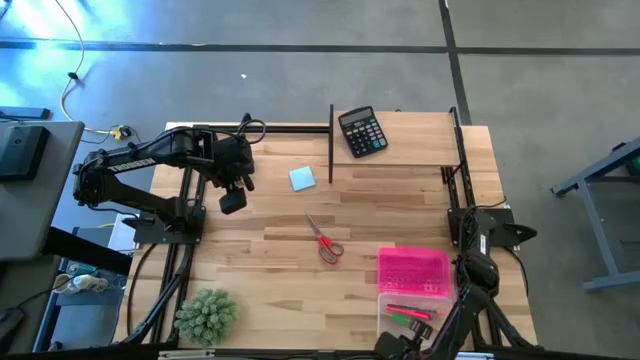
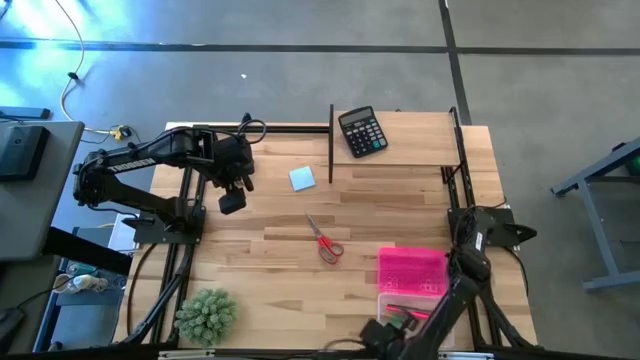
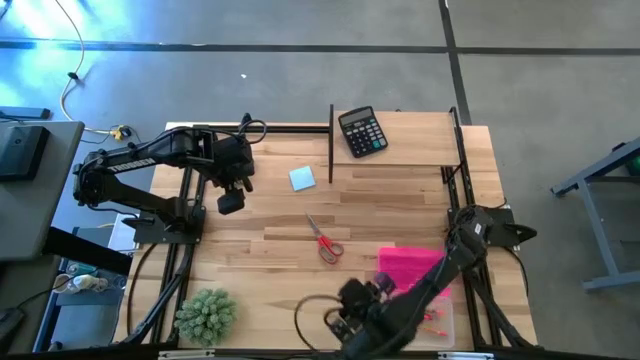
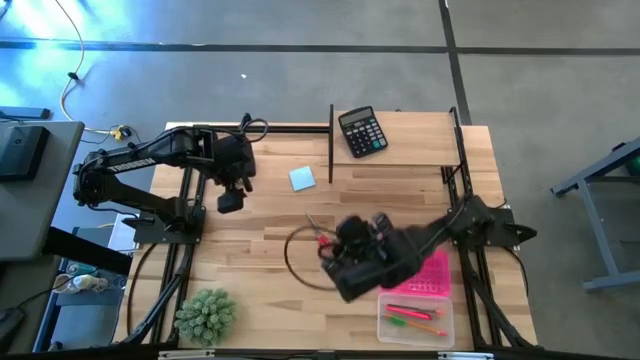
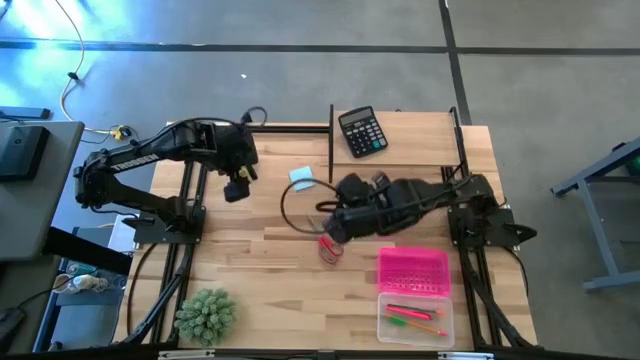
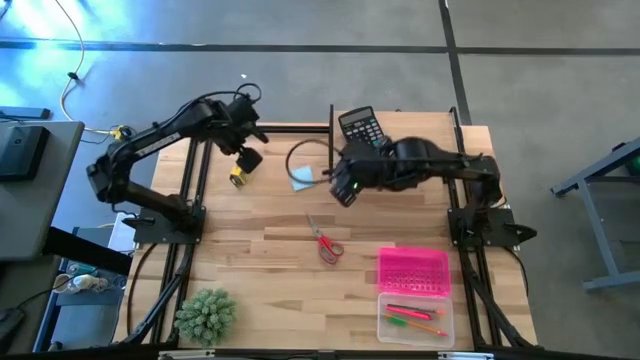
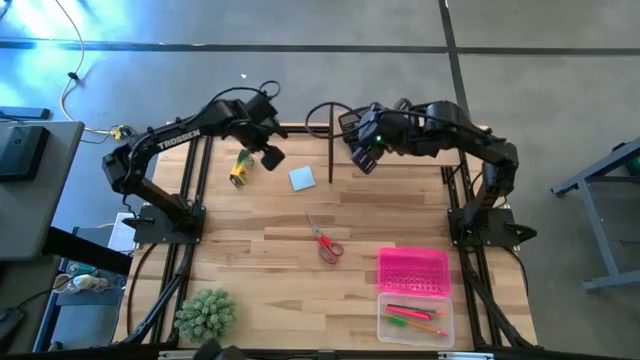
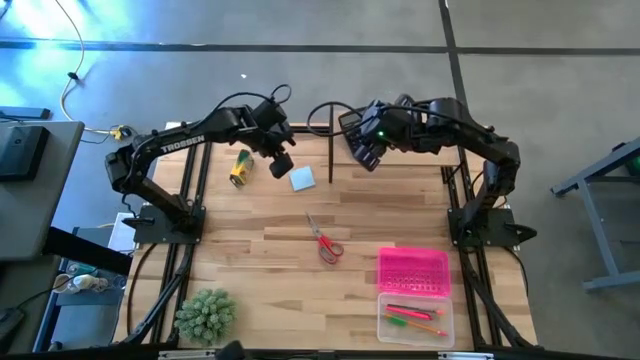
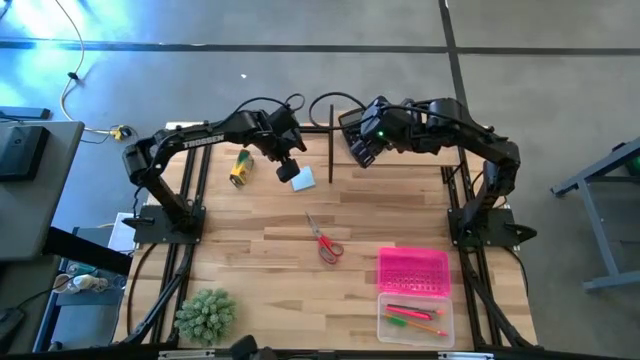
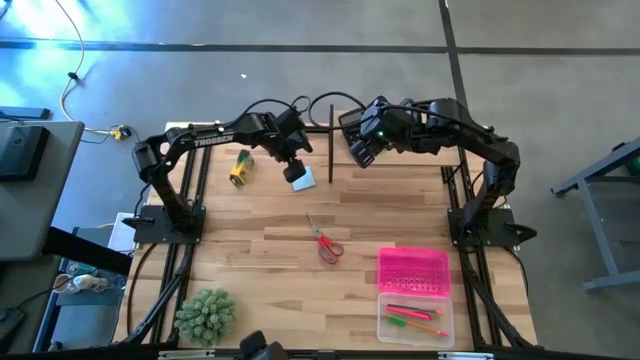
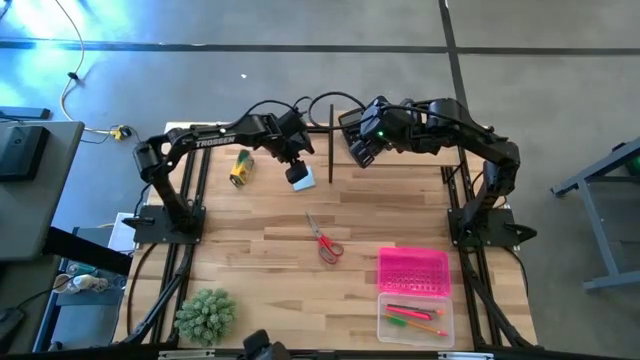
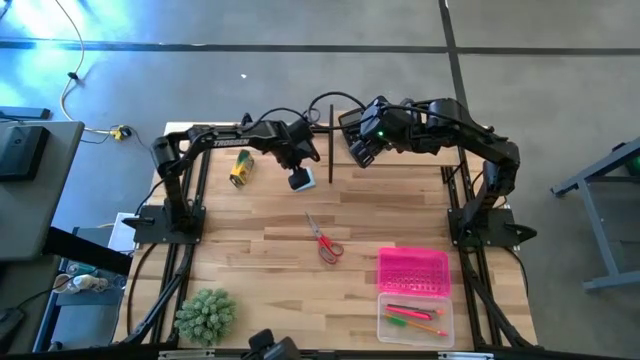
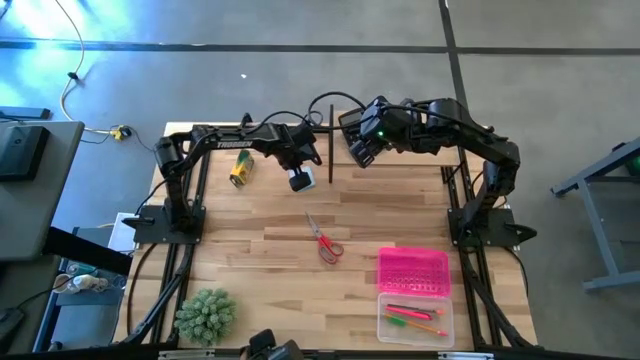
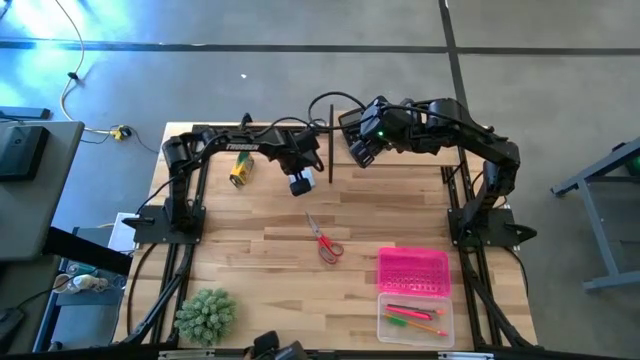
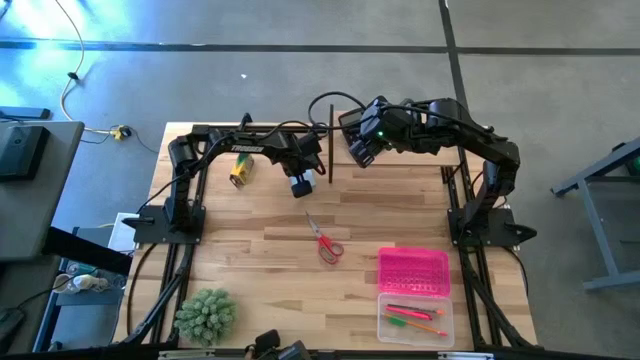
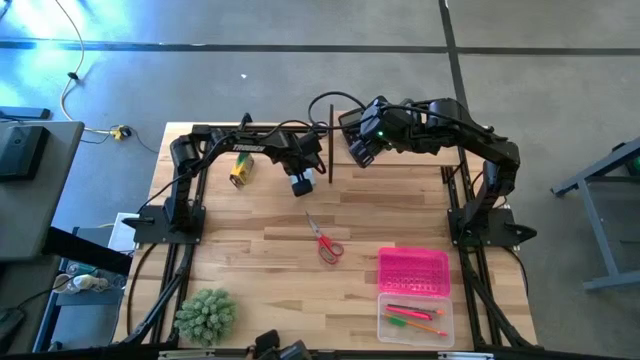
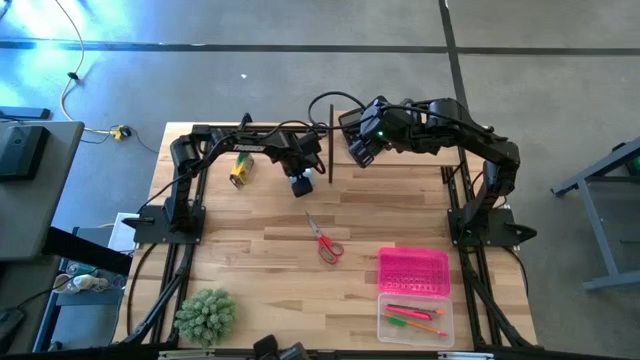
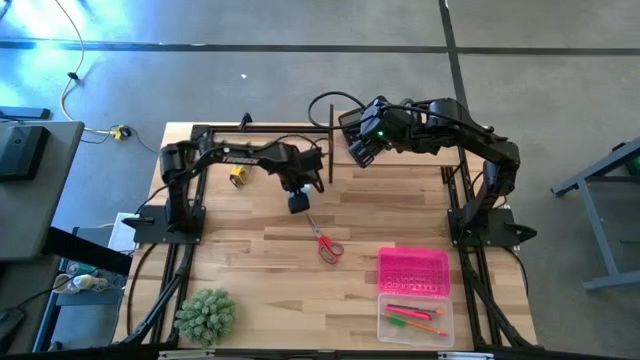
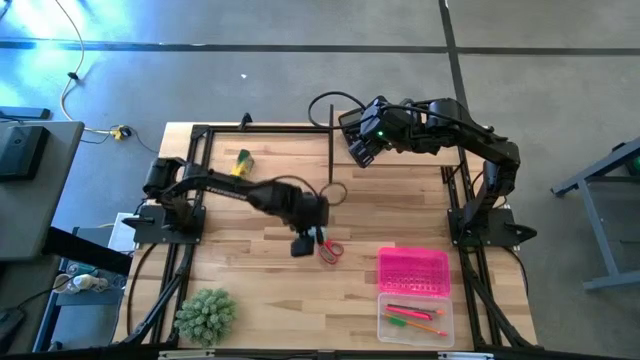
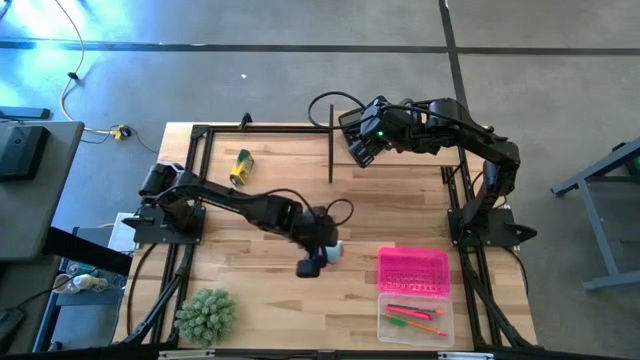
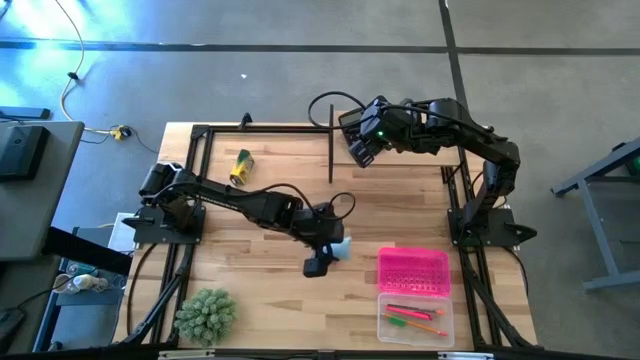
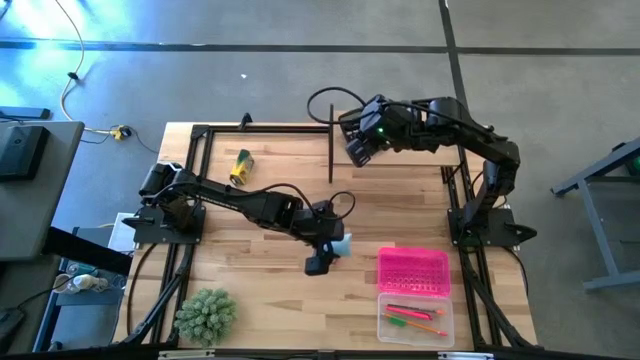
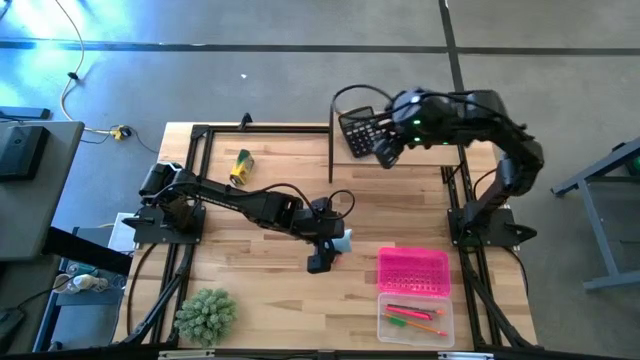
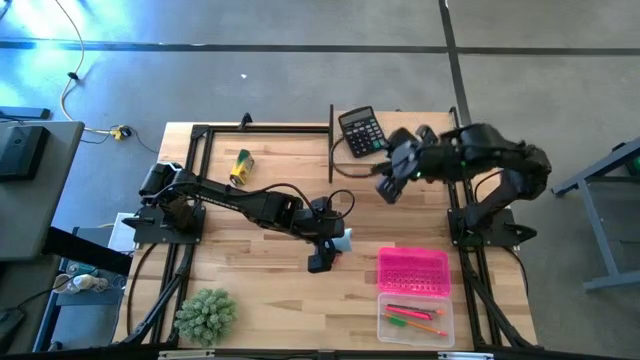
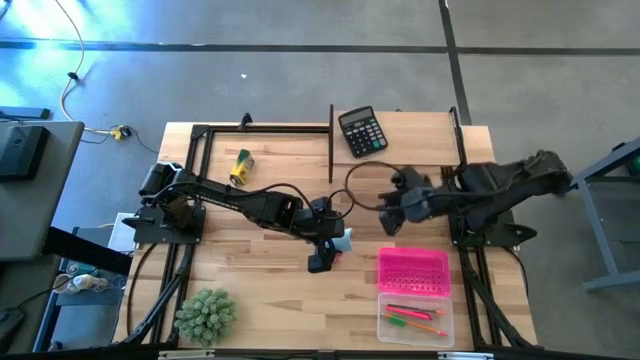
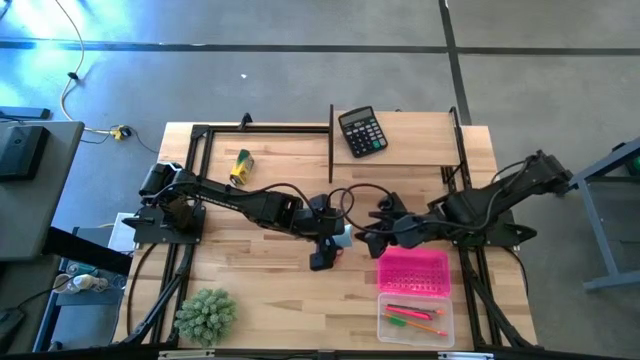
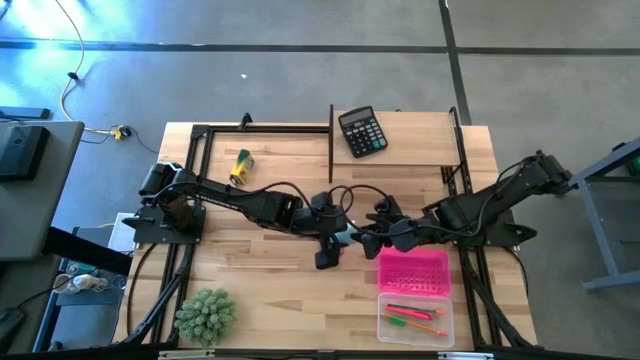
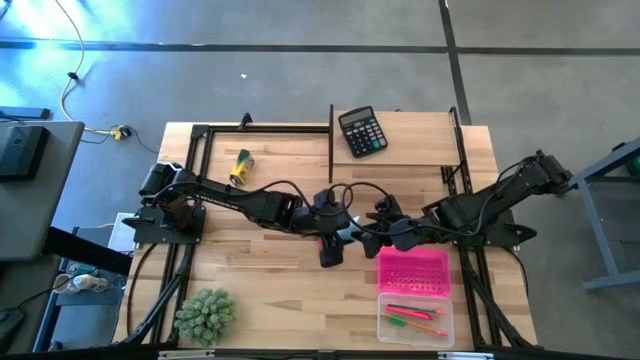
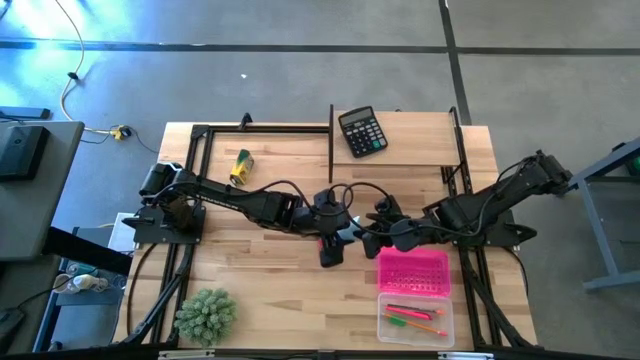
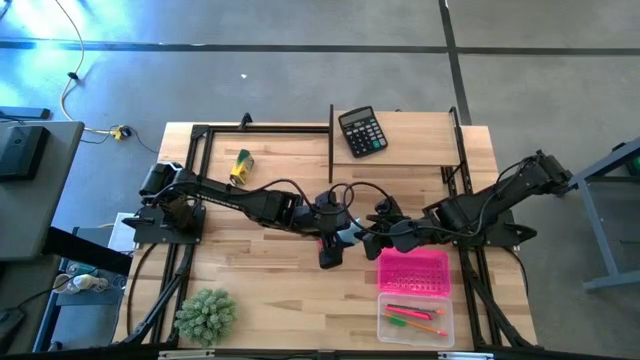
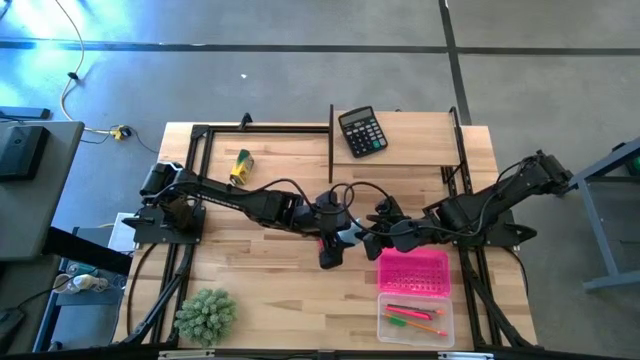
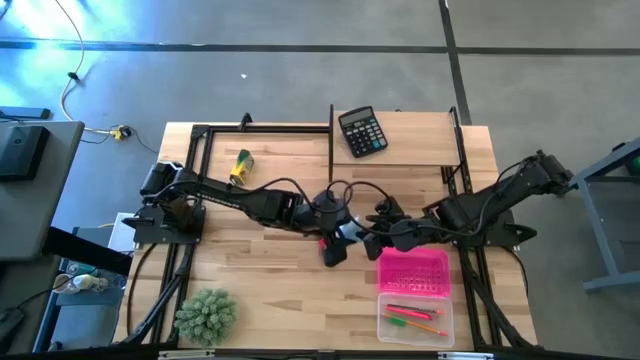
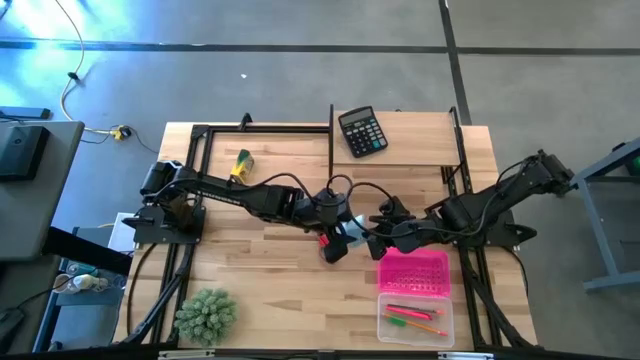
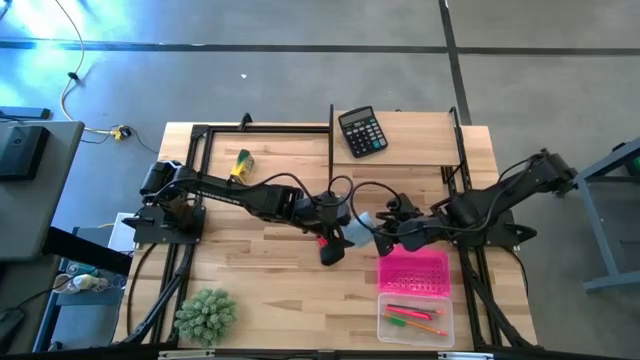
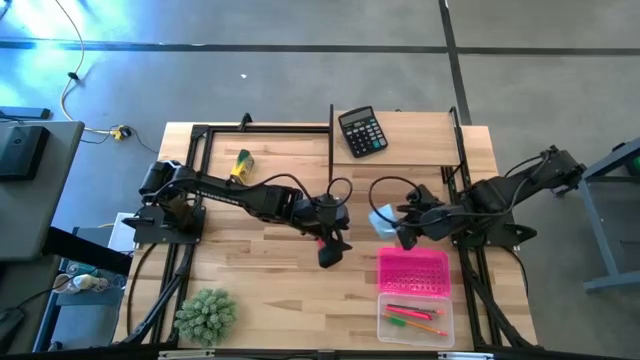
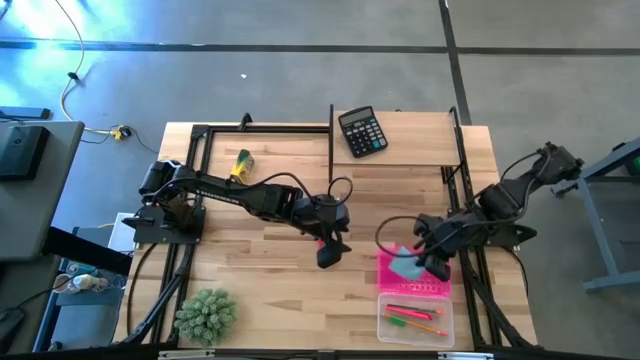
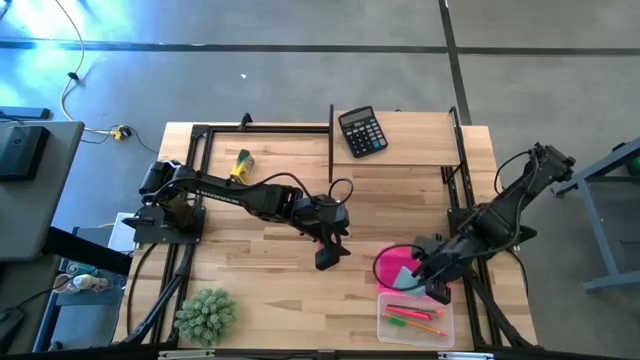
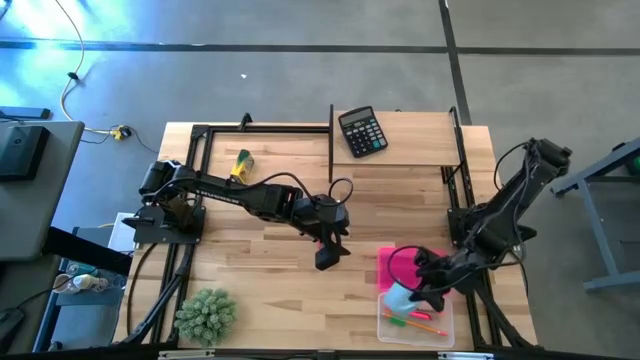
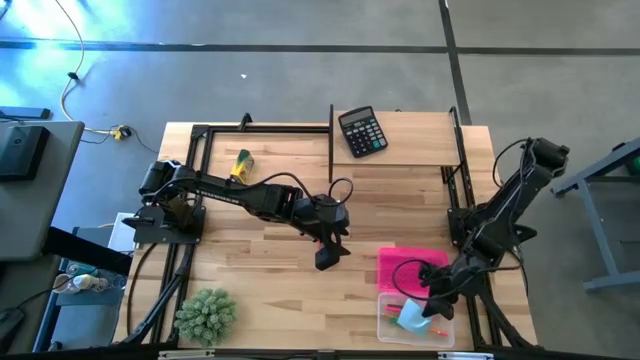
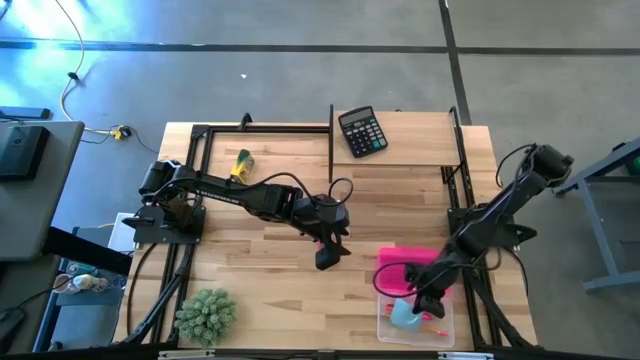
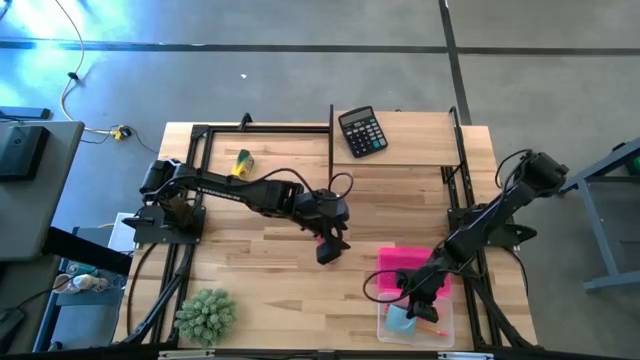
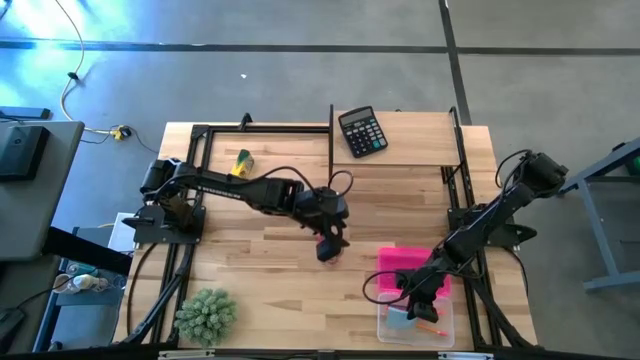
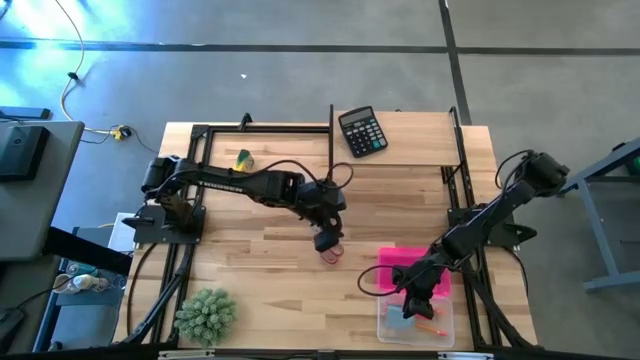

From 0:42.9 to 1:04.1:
Task: Pack school essentials
Put the blue sticky notes into the supply box
